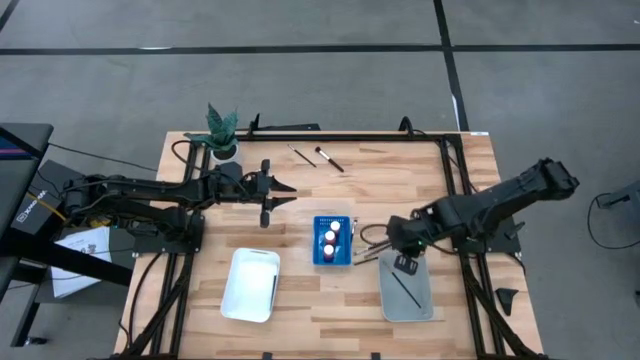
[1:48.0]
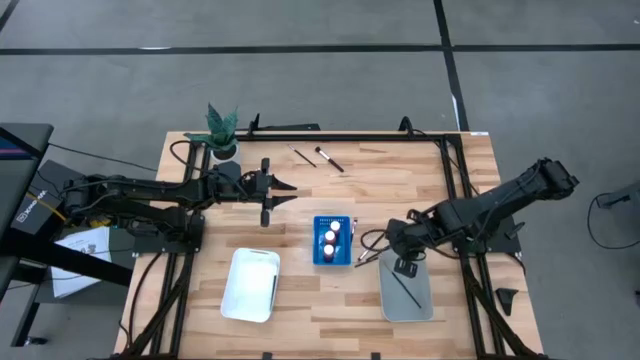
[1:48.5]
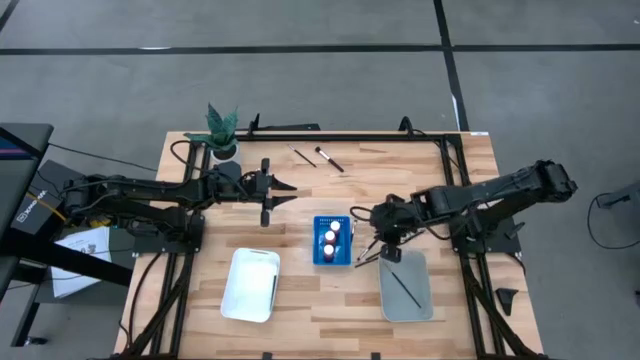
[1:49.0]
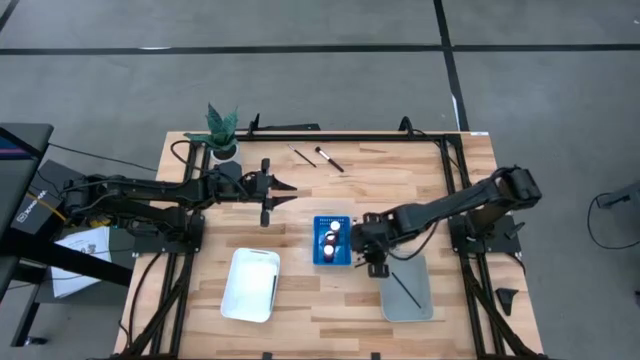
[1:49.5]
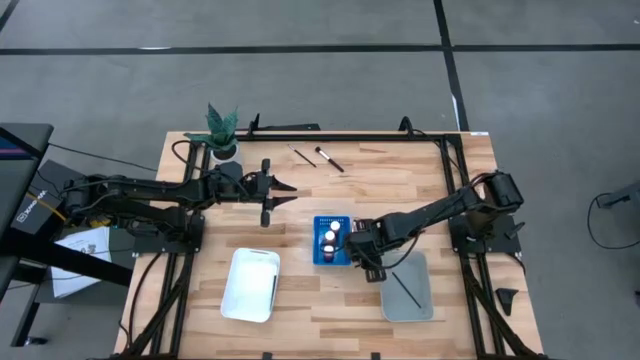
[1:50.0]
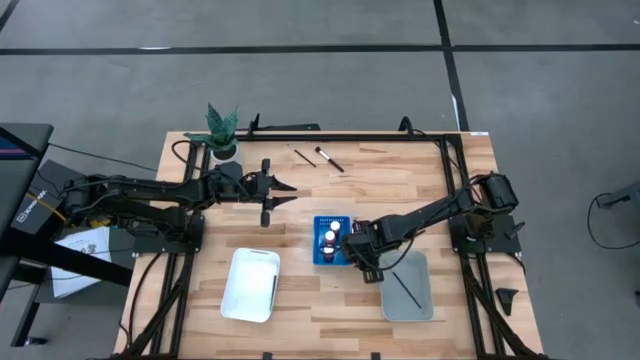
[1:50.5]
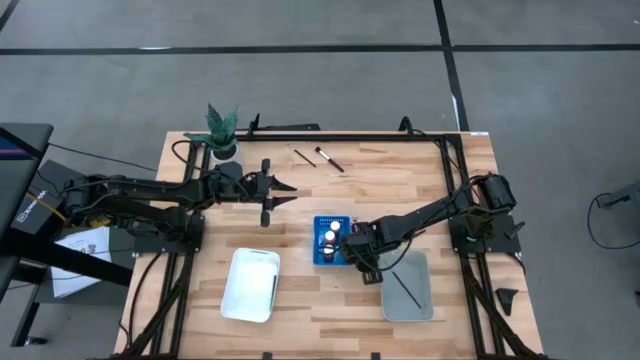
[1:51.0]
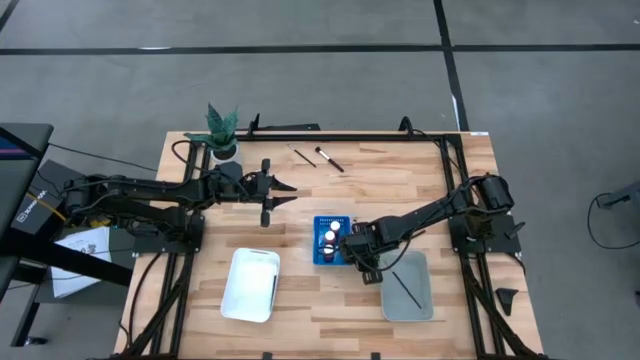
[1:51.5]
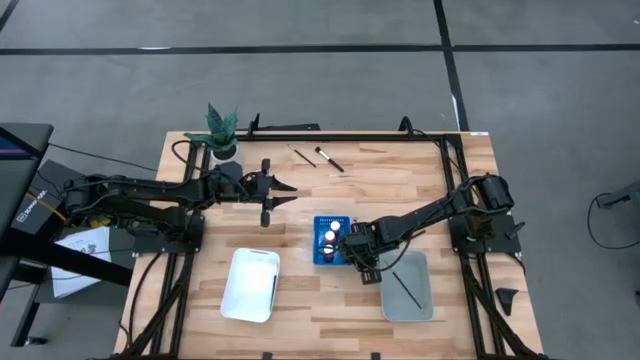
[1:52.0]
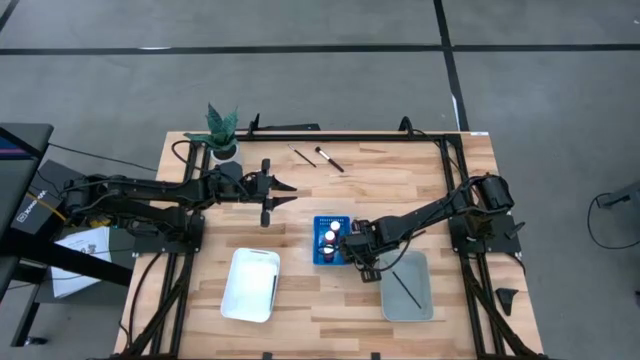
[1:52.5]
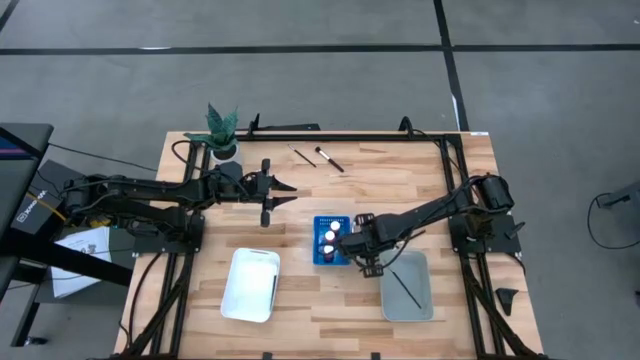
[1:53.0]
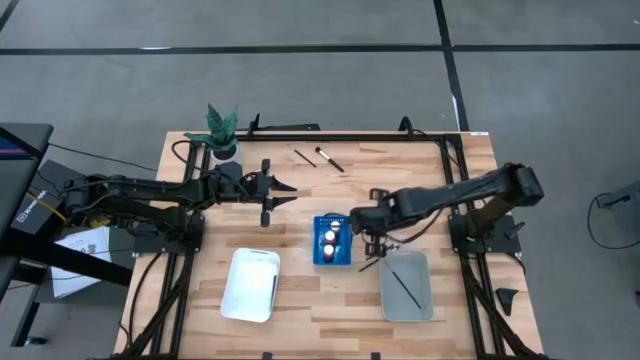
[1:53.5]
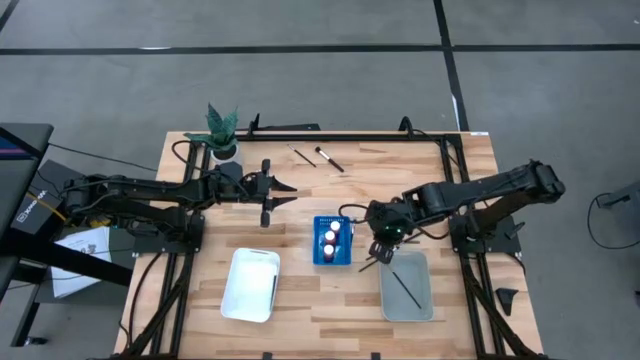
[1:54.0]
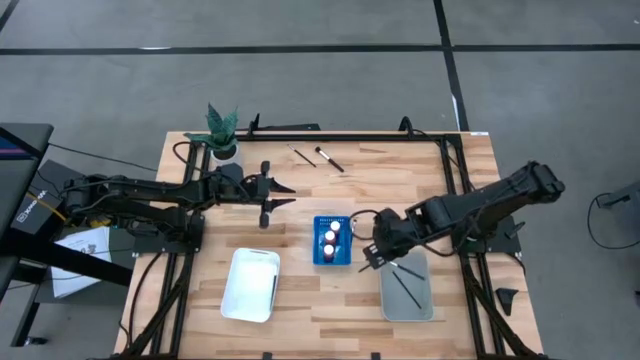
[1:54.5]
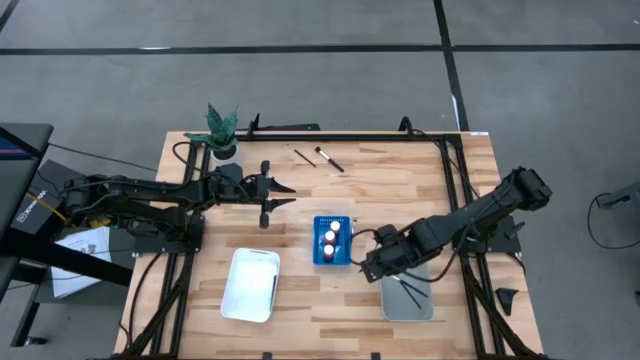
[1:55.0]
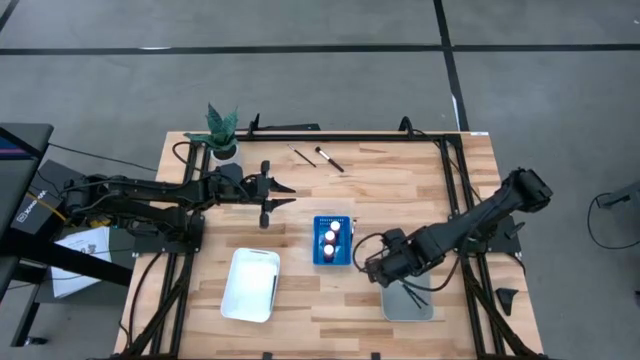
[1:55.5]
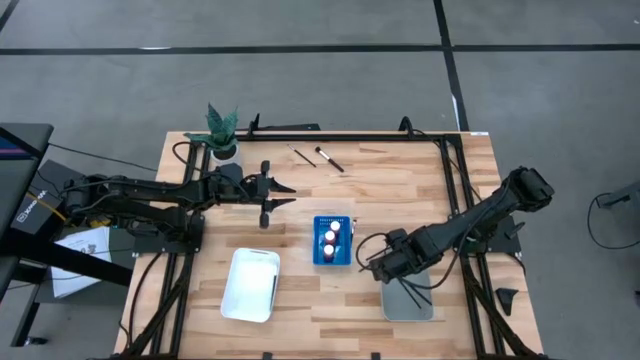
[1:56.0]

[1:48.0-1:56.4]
Task: Pick & Place Paint Supplies
Put the eyeshadow brush into the gray bin

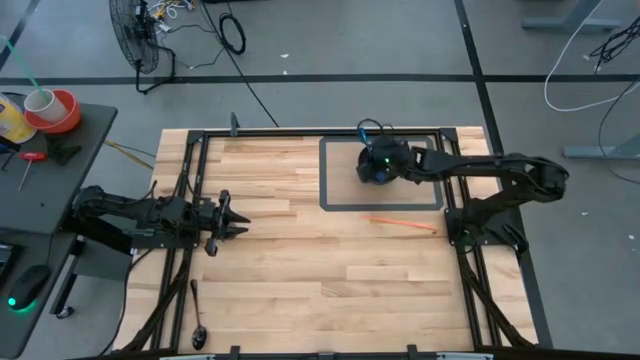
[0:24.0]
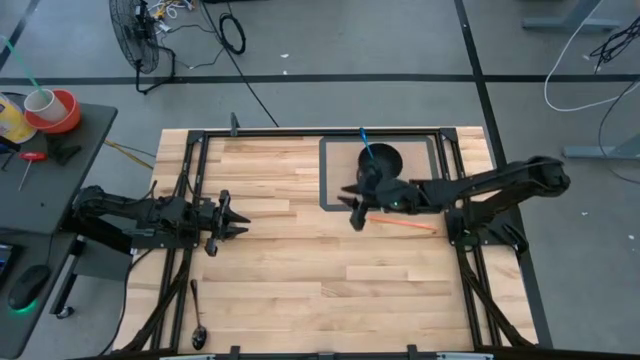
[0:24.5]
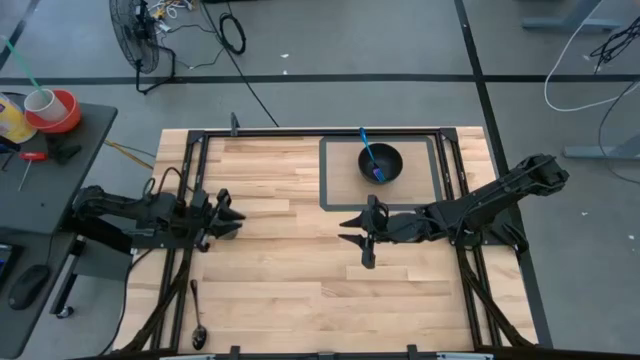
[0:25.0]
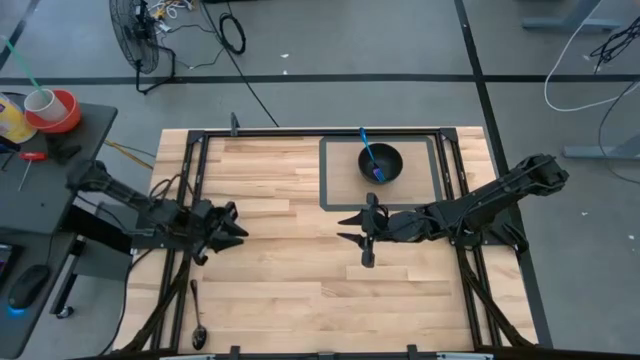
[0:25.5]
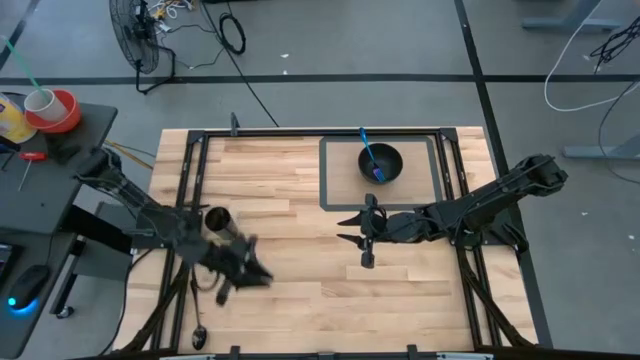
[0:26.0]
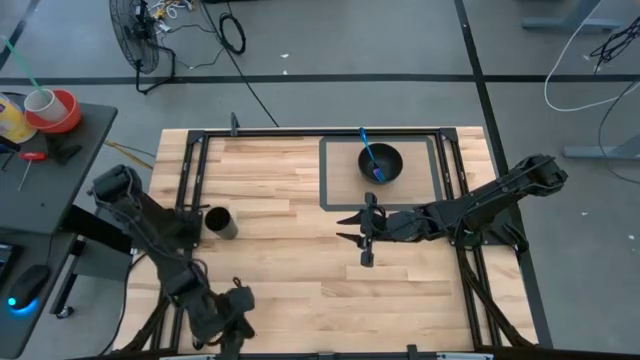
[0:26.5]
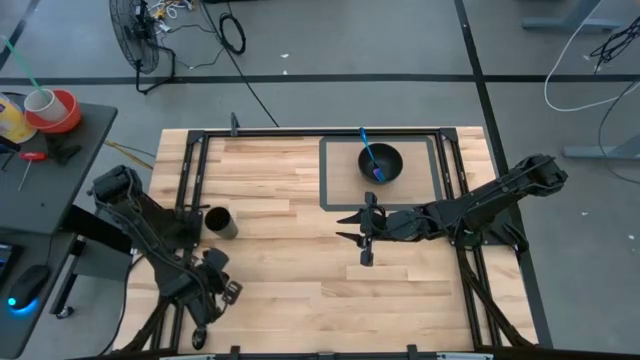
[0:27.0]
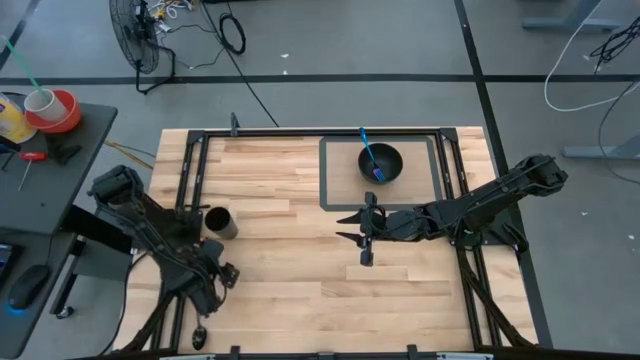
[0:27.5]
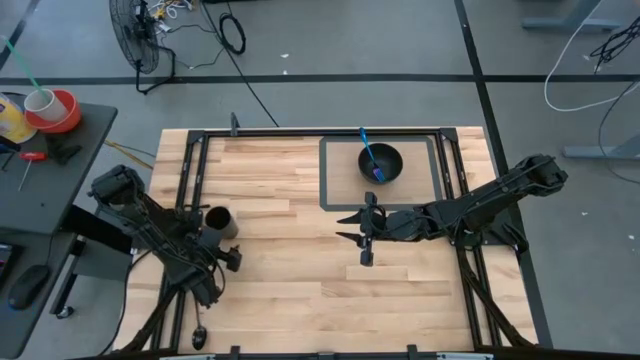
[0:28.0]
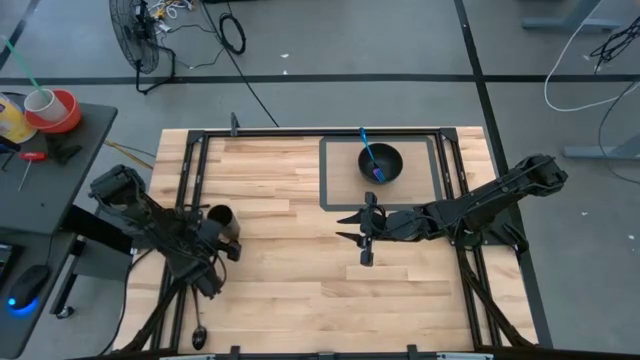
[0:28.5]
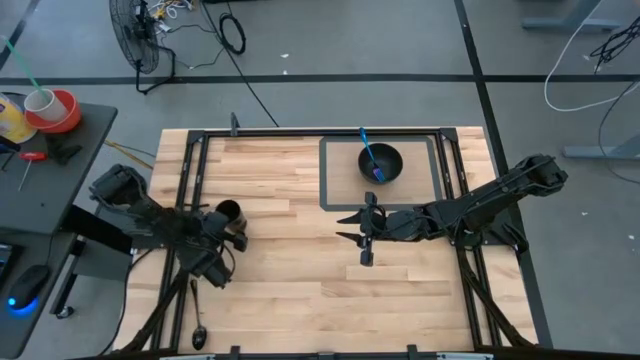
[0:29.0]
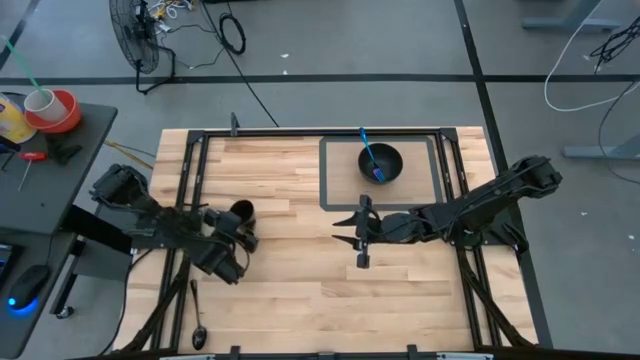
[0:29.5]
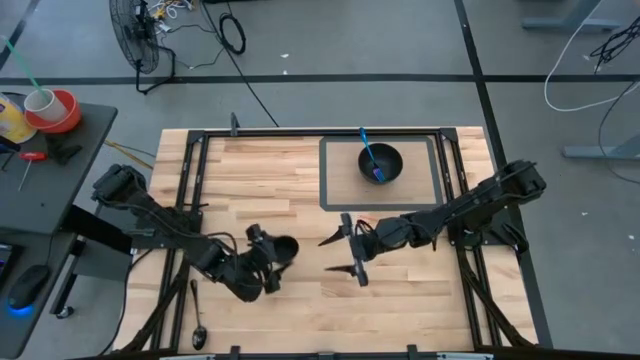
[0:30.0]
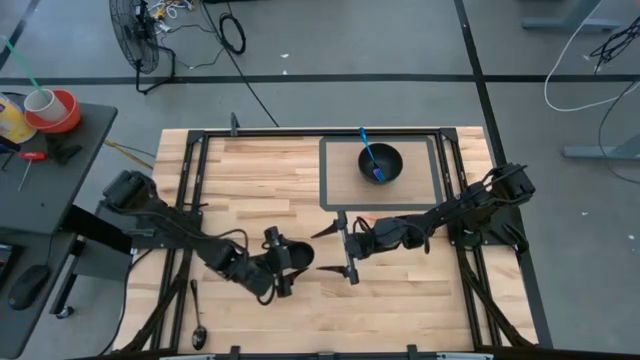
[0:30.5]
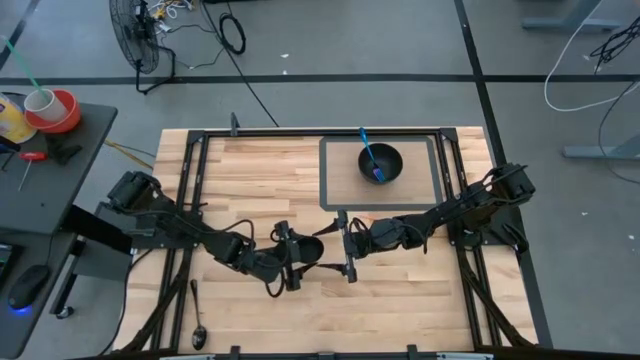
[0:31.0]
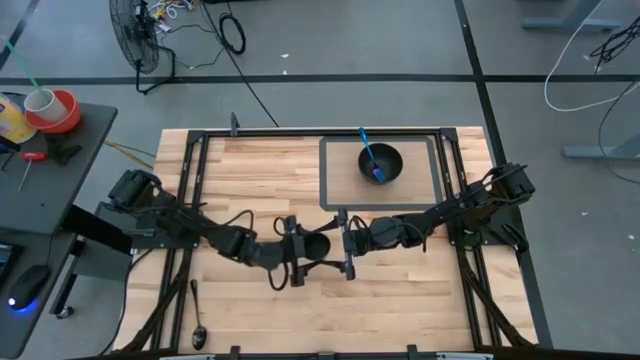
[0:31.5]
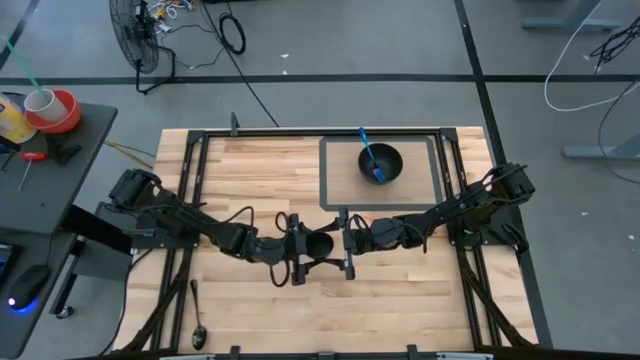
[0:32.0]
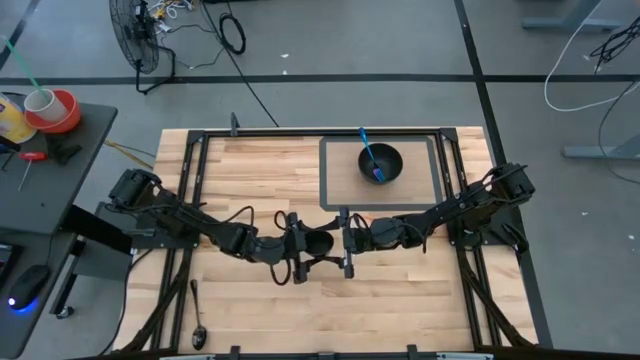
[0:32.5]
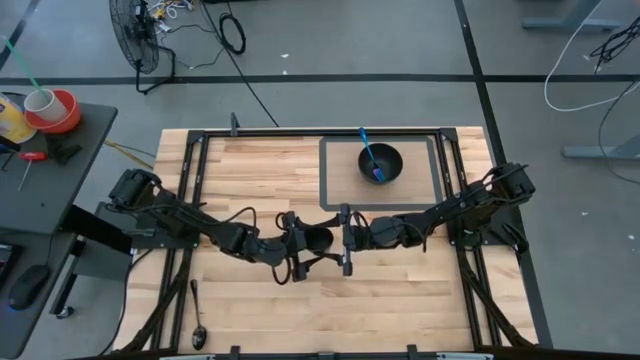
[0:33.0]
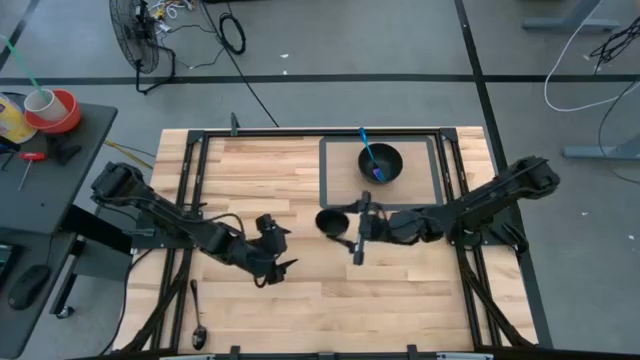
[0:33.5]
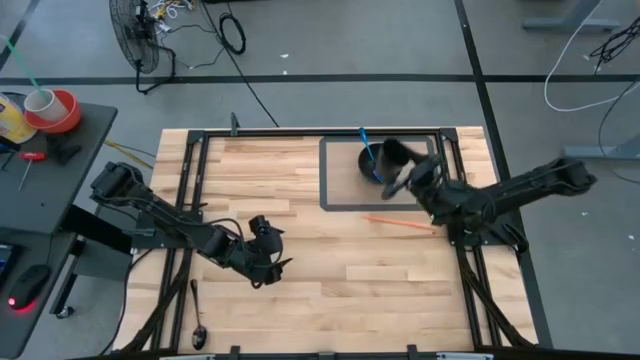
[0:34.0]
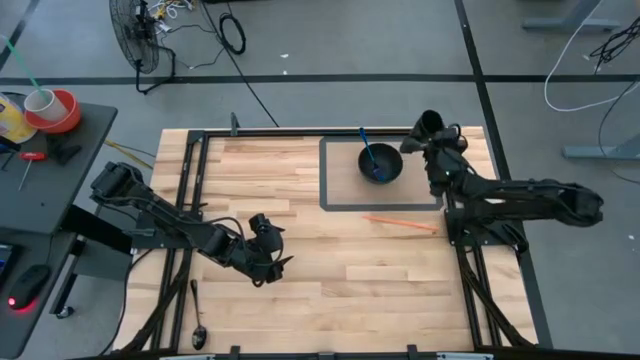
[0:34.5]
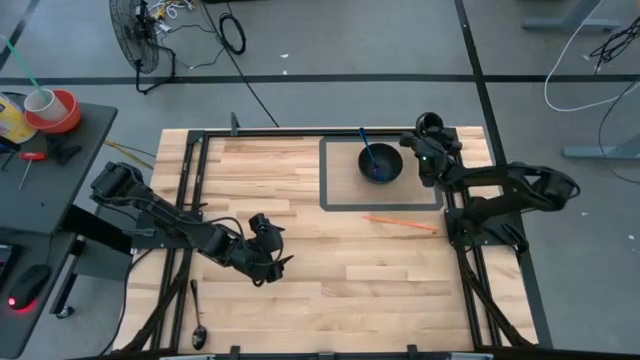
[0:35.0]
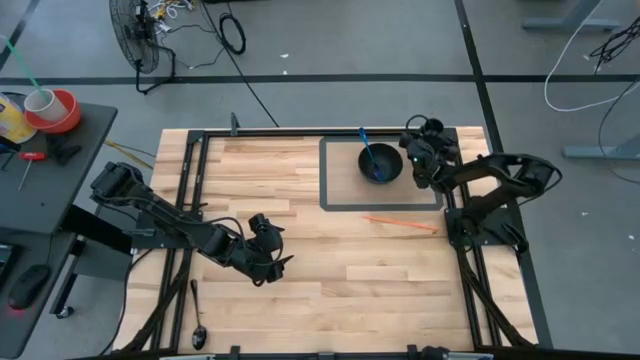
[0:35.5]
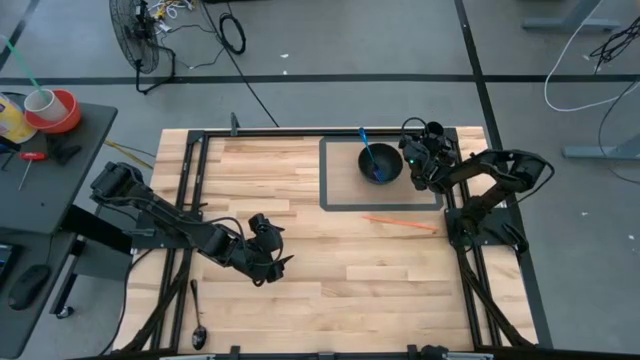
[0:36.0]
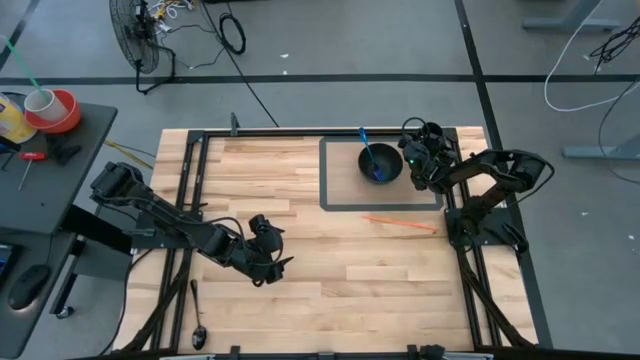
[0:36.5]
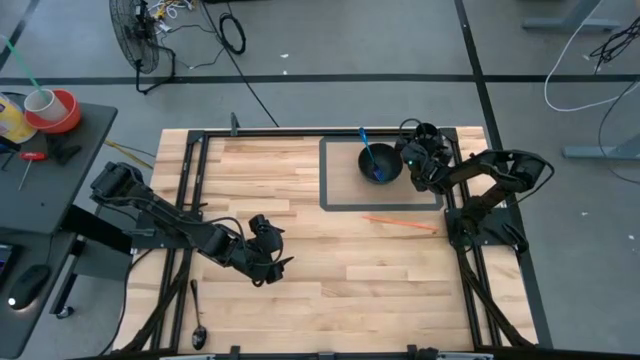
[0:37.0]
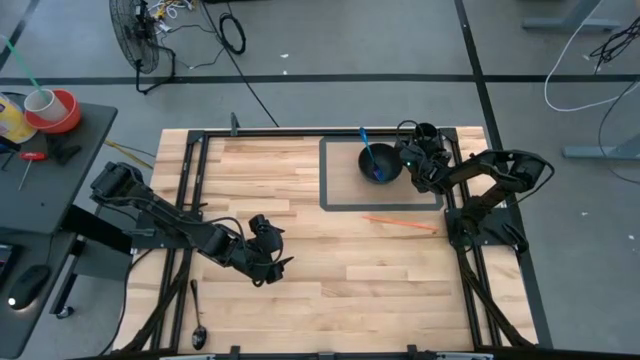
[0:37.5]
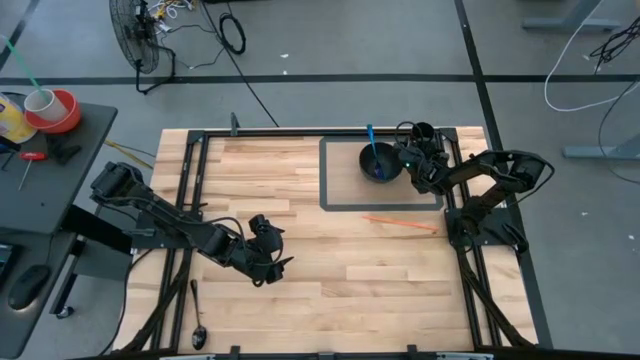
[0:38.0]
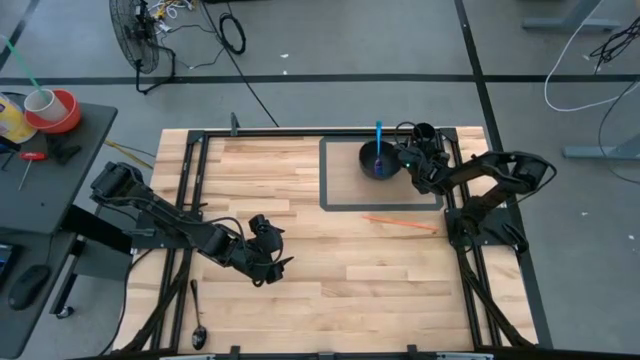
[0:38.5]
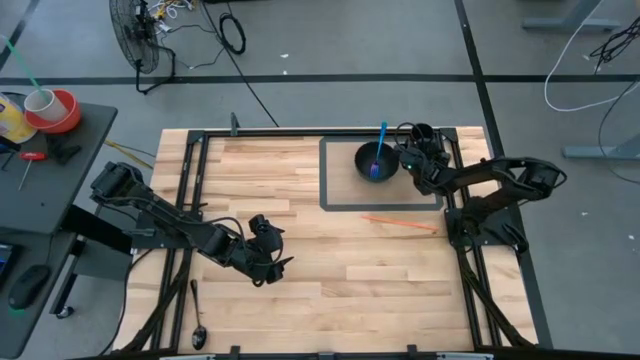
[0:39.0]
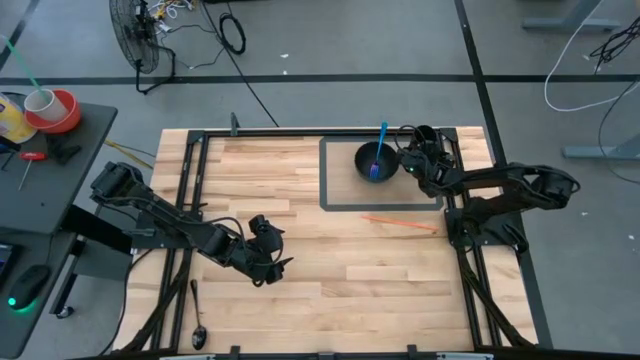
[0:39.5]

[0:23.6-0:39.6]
Task: Pick & Place Utensil
Put the black cup on the brown mat to the right of the black bowl
